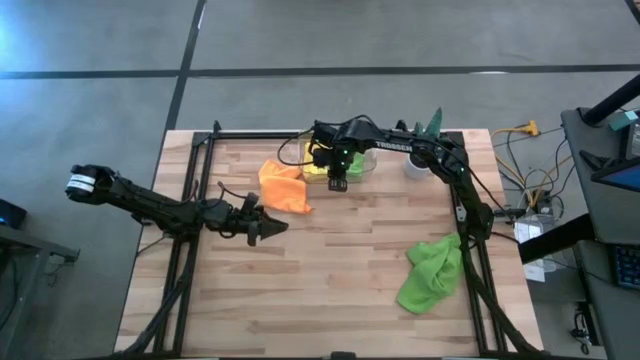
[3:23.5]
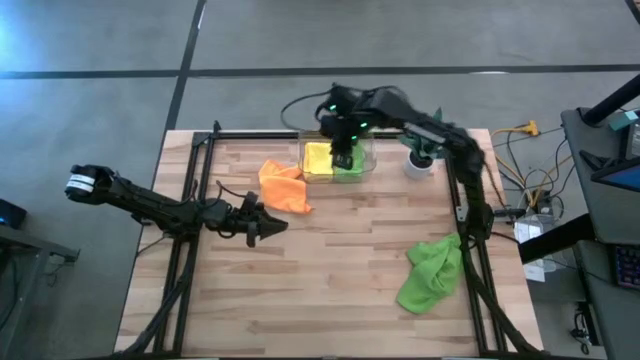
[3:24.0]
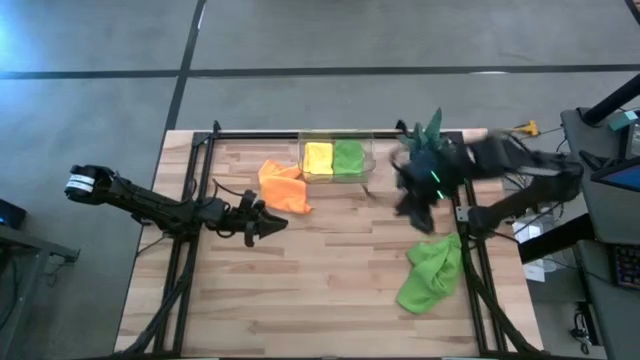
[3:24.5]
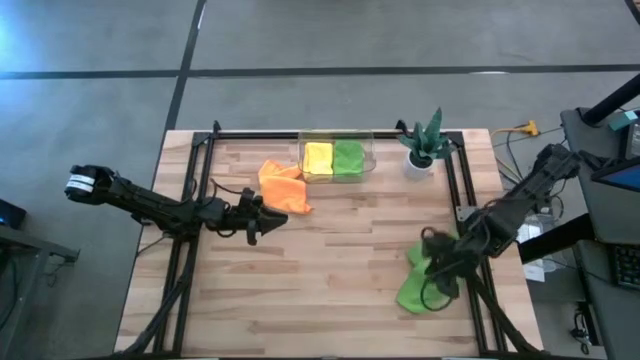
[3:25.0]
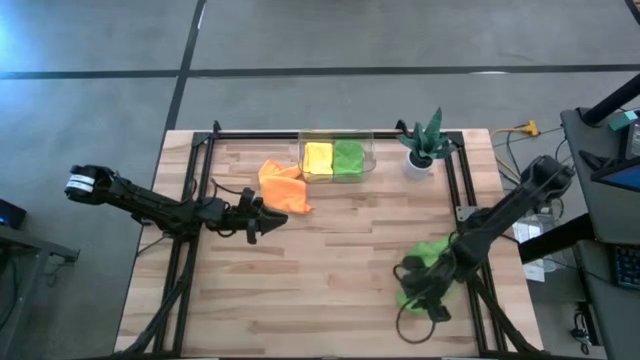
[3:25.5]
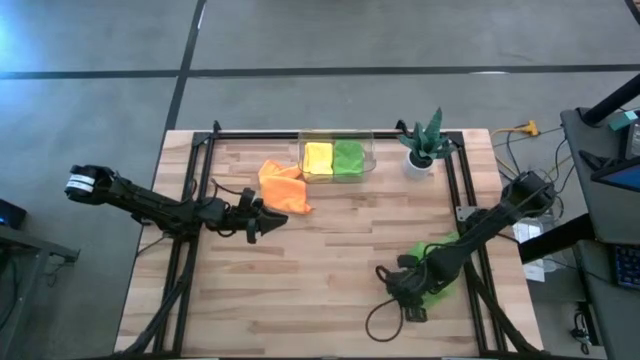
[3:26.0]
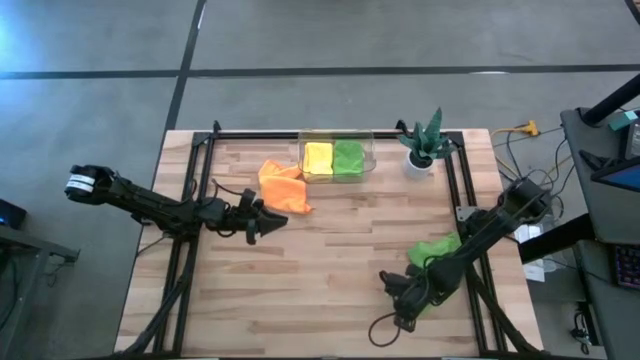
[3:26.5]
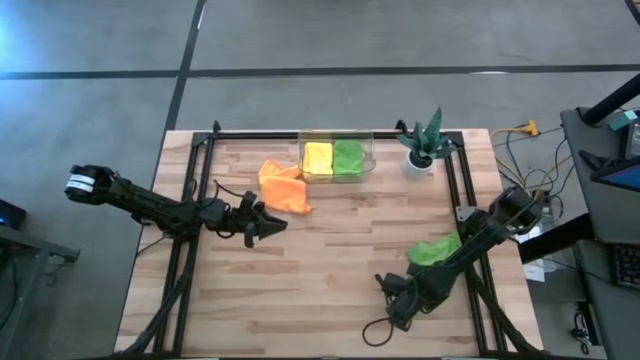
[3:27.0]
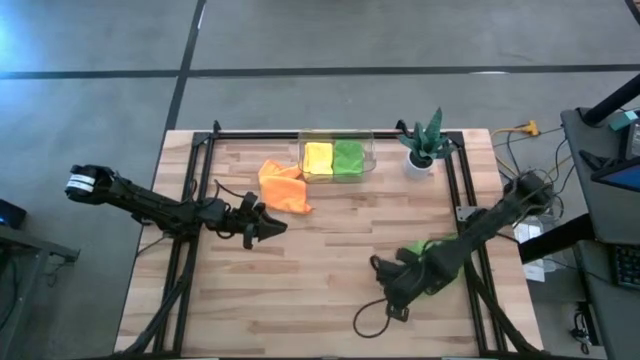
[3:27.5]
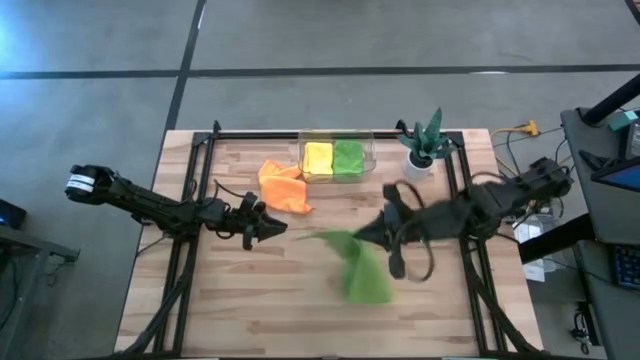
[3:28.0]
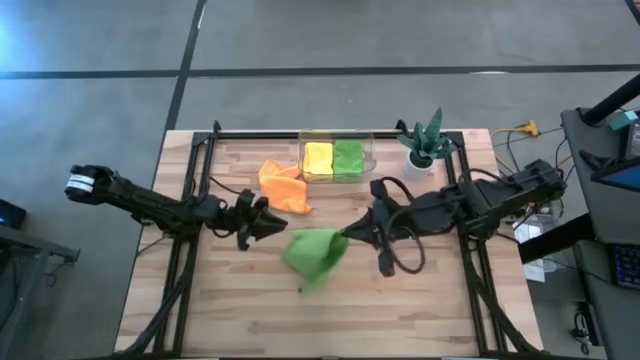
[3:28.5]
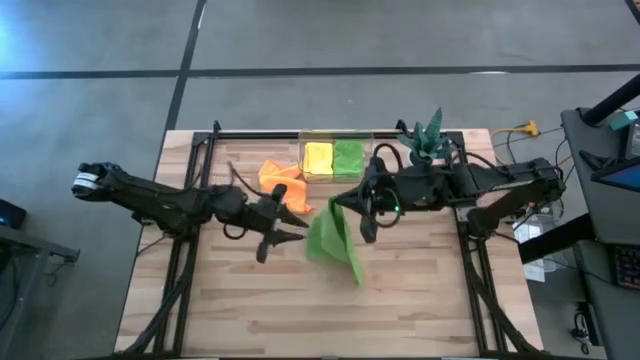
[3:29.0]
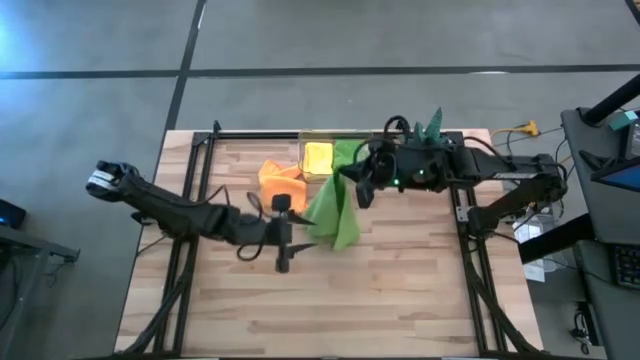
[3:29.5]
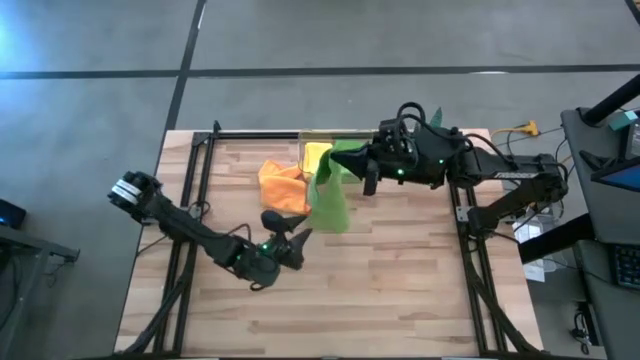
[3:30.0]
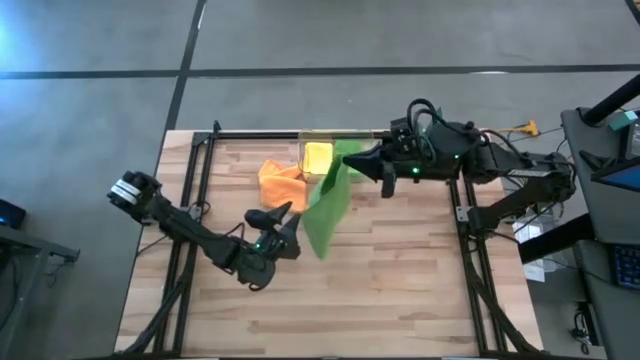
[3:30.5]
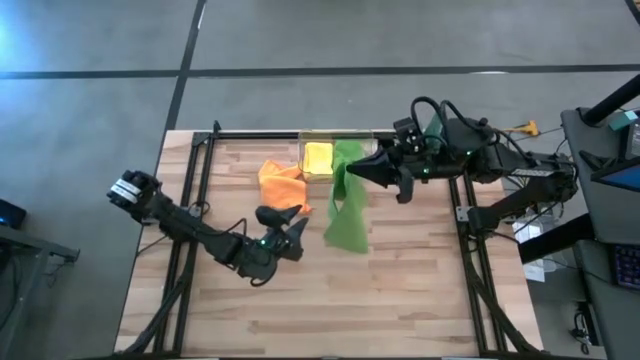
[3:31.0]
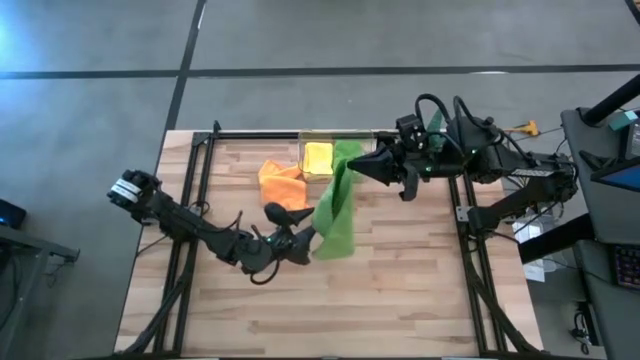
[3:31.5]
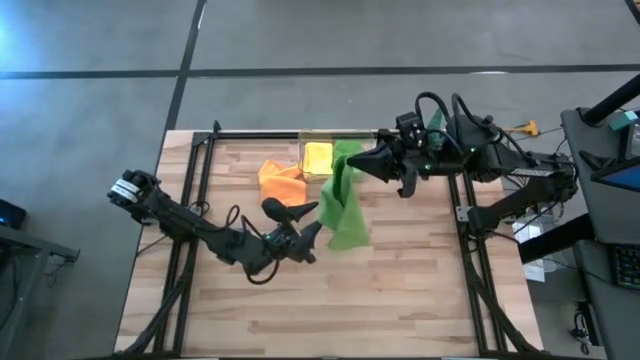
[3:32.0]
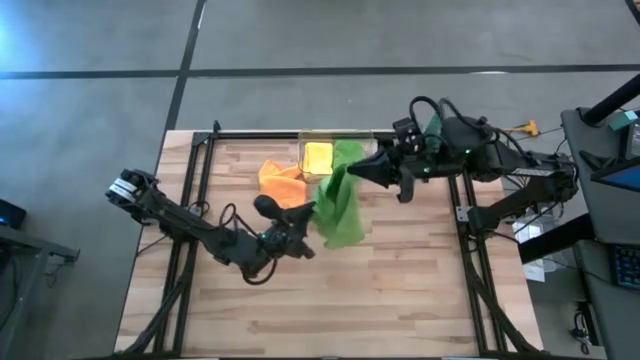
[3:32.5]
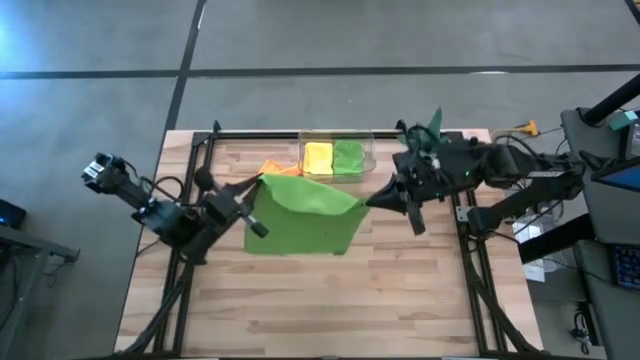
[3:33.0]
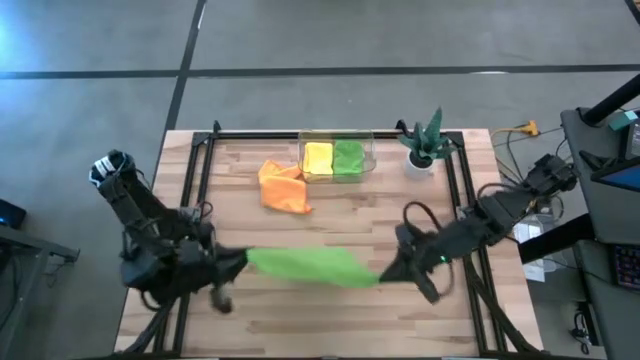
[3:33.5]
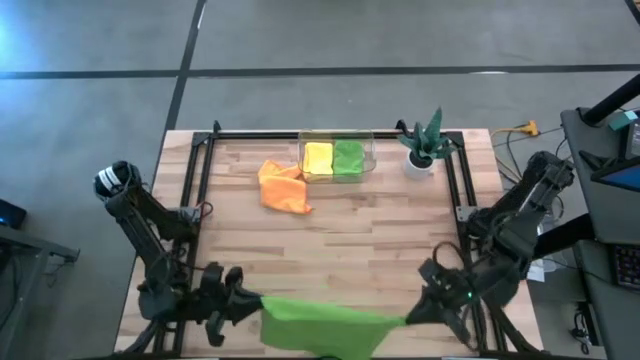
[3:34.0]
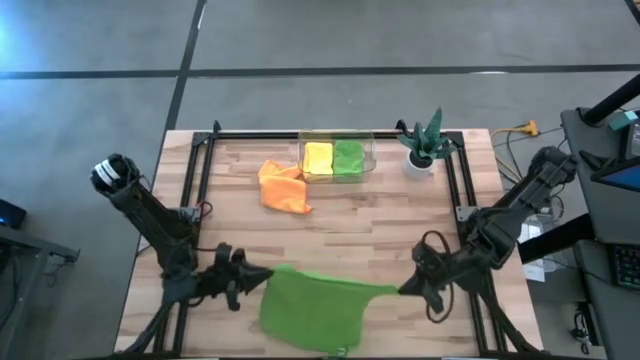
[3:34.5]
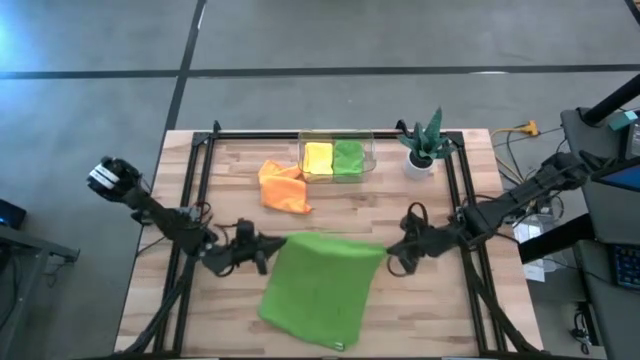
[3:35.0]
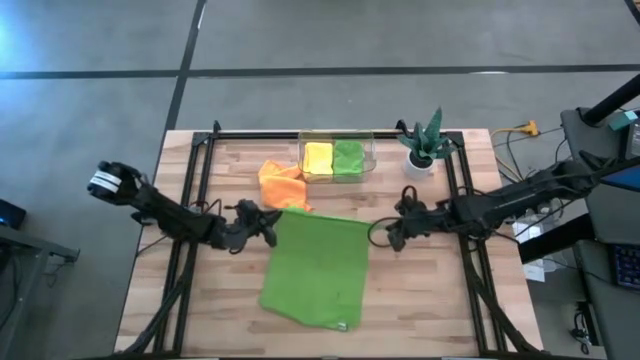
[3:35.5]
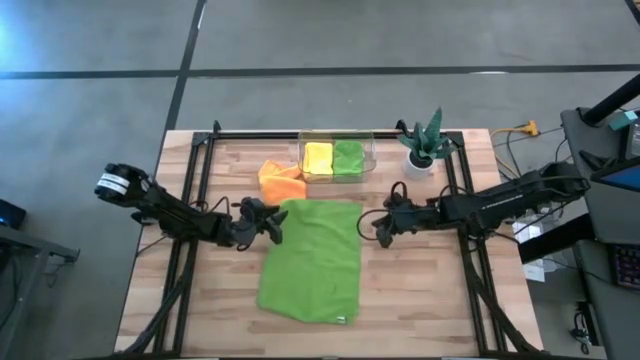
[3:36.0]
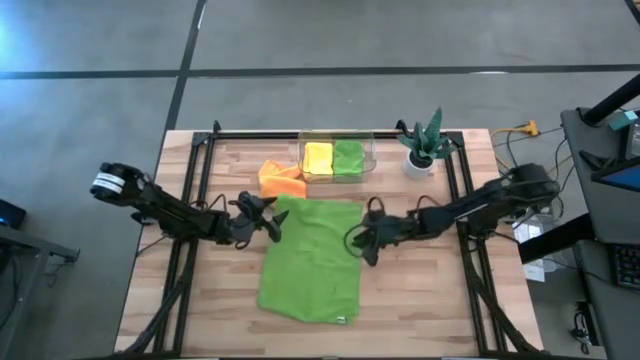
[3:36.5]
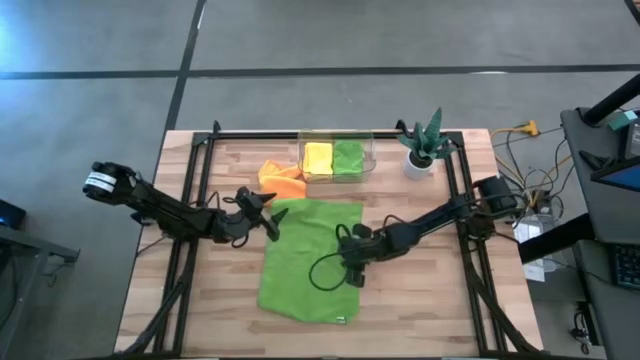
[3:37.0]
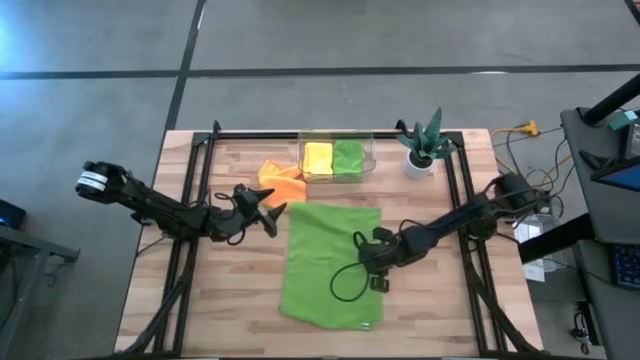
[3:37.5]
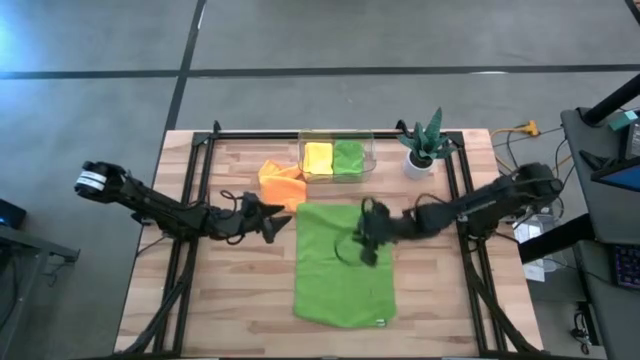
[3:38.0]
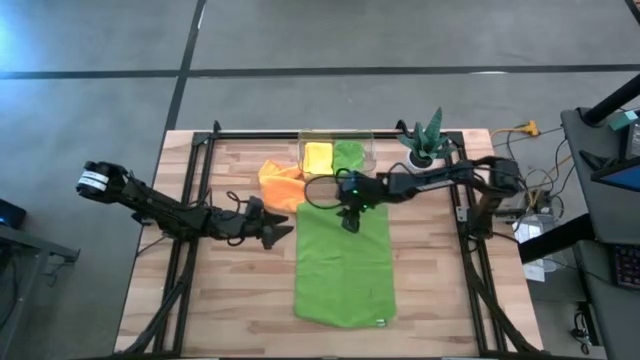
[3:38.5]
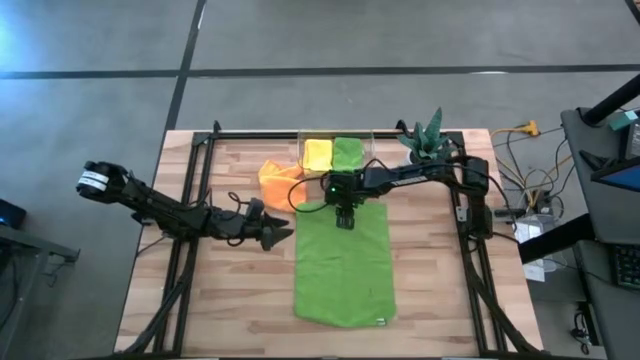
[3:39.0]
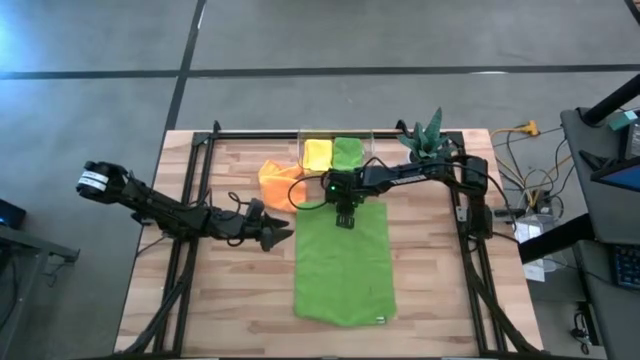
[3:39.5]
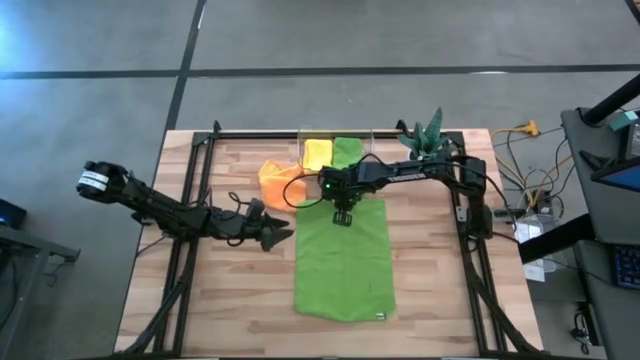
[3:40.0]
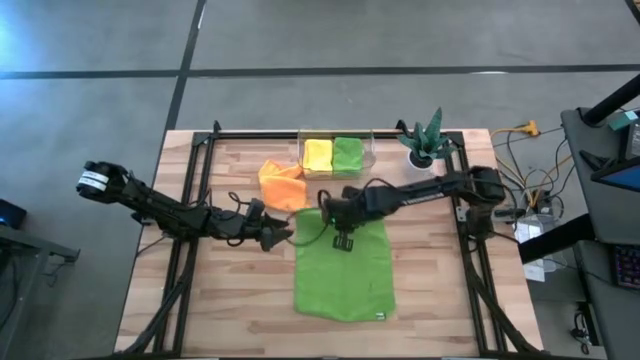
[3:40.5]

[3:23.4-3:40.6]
Task: Fold microfiber towels
Fold the green microfiber towel

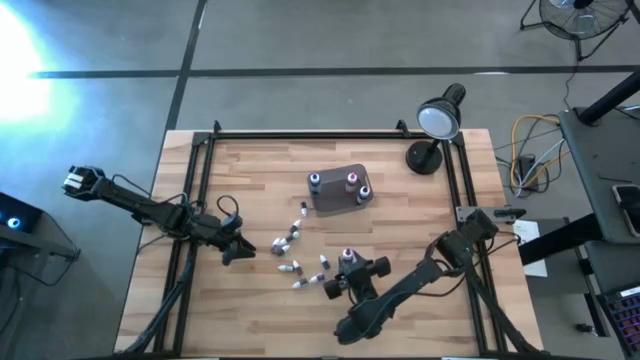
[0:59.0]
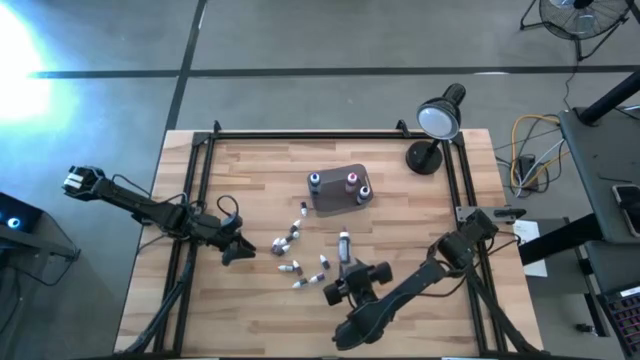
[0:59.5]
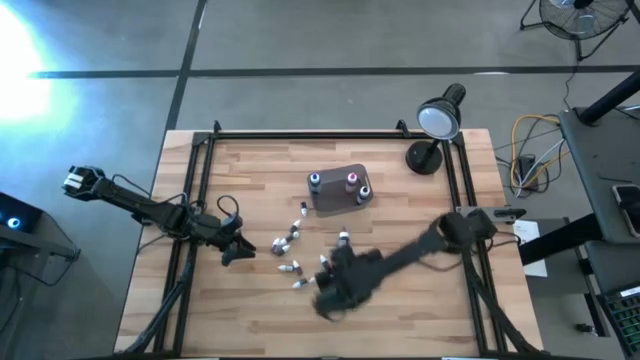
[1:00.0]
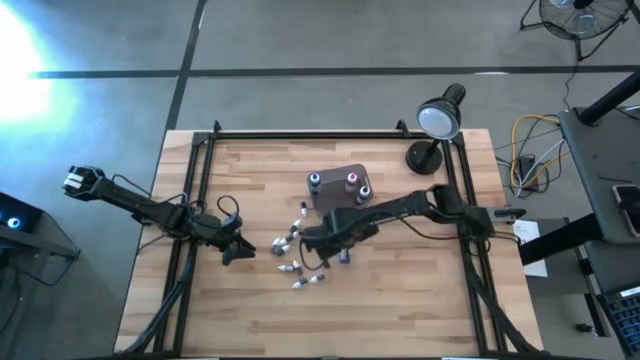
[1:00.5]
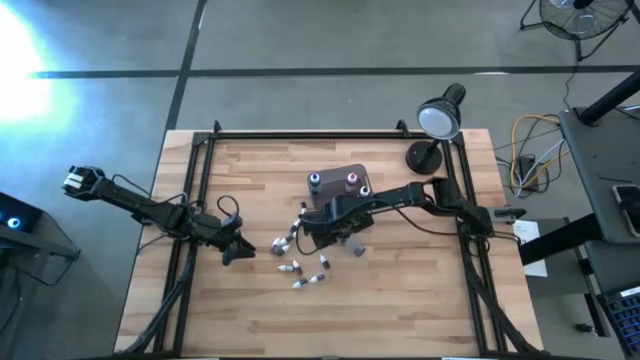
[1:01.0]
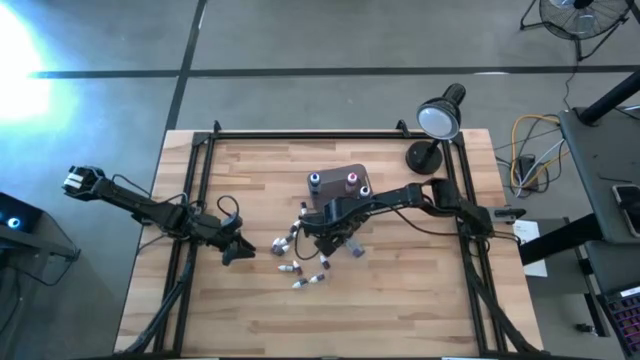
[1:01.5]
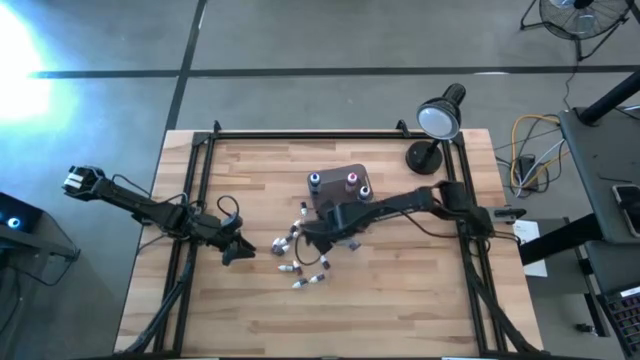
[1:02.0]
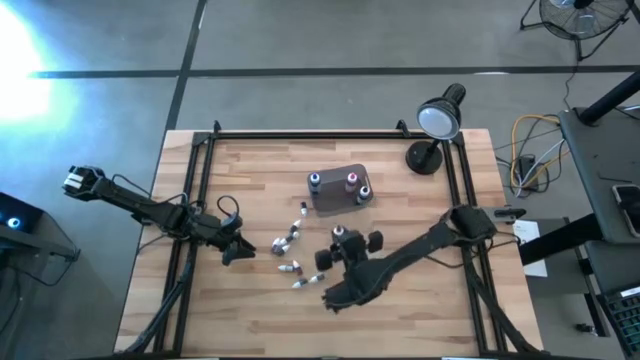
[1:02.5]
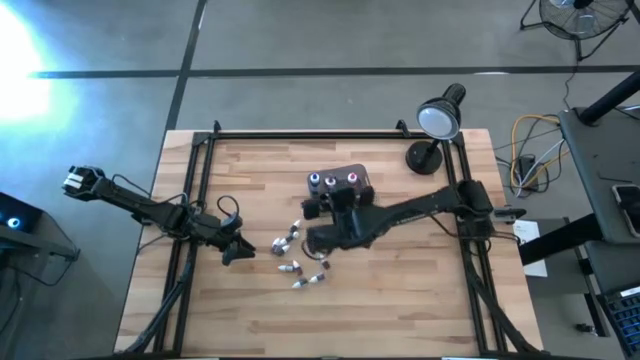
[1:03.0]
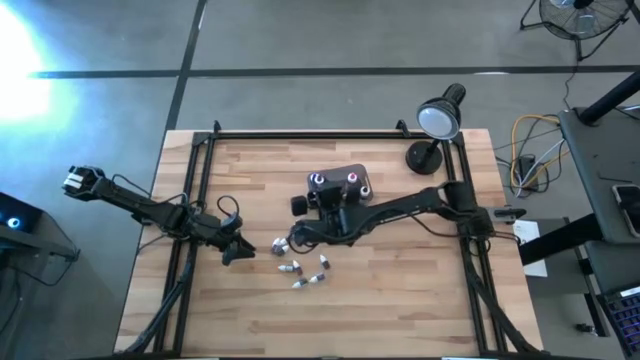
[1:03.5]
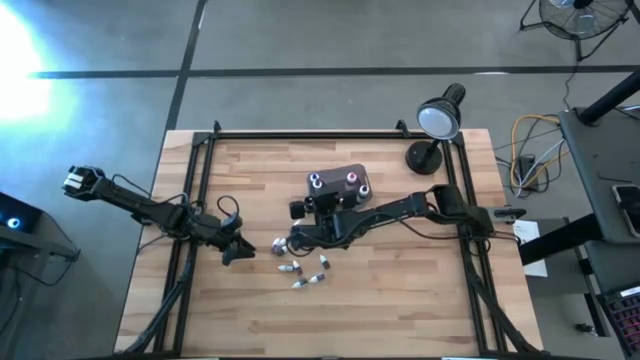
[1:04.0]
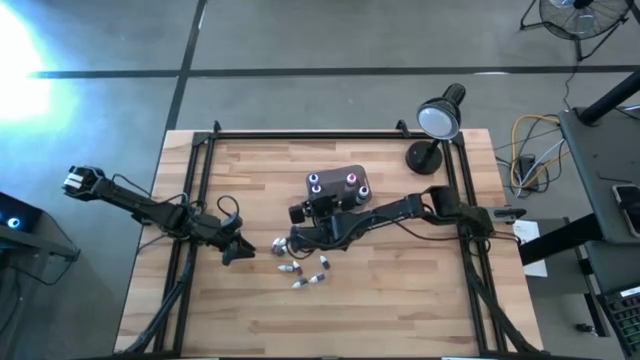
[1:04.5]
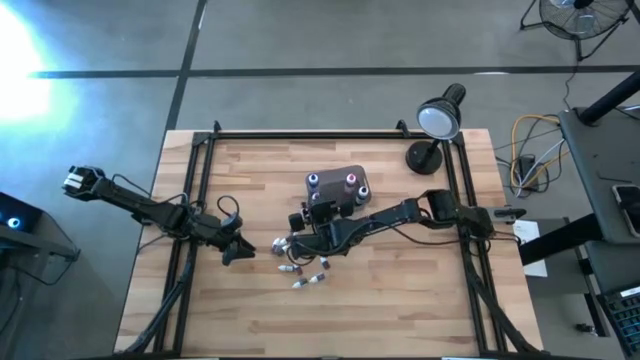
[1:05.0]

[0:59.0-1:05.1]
Task: Pick & Place food coloring
Put the big purple food coloring bottle into the black transparent bin
